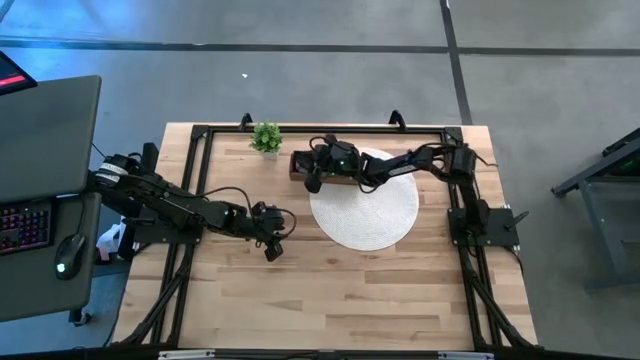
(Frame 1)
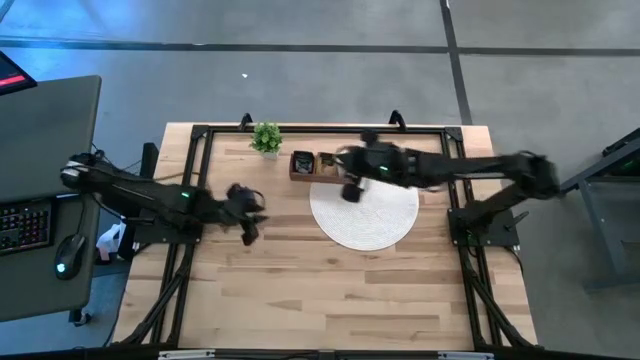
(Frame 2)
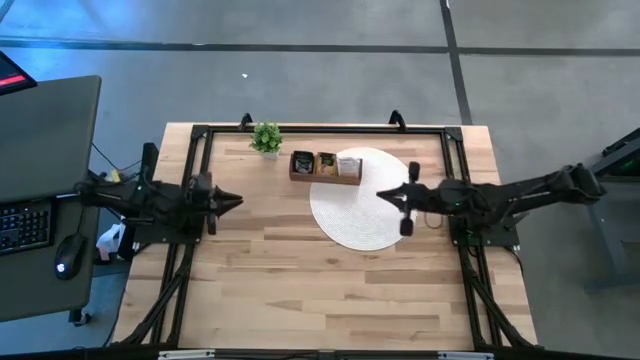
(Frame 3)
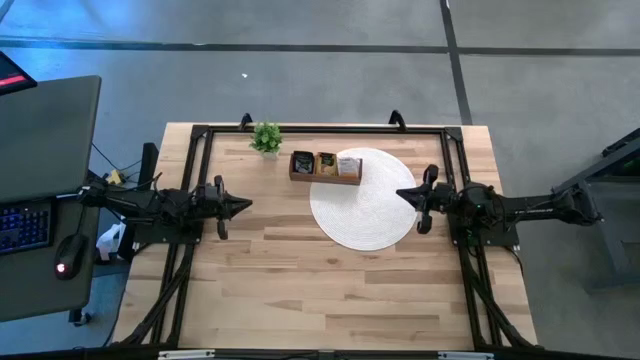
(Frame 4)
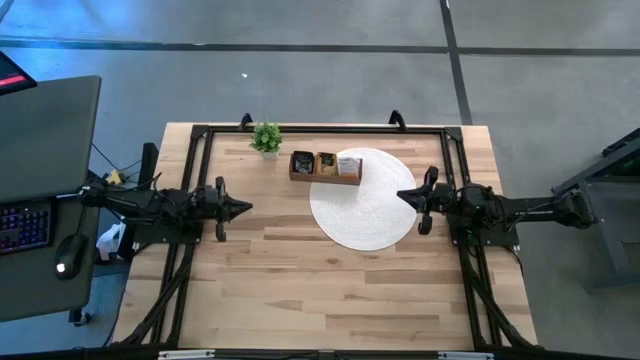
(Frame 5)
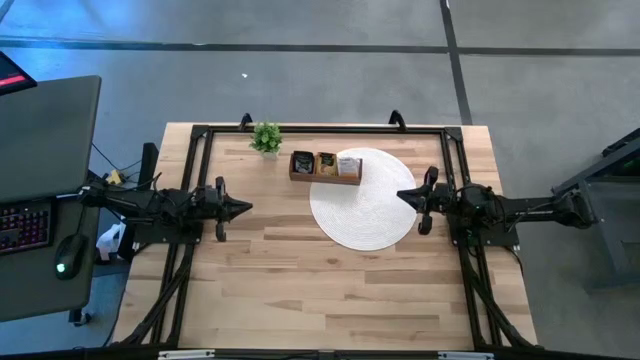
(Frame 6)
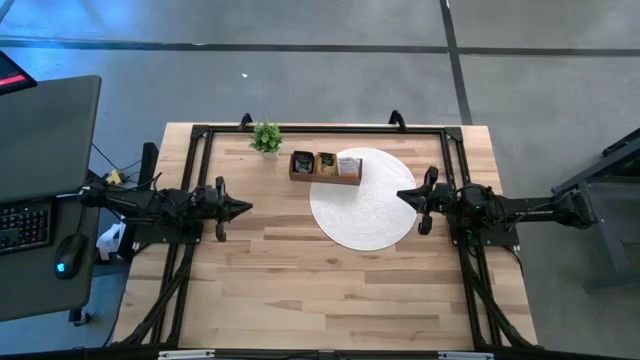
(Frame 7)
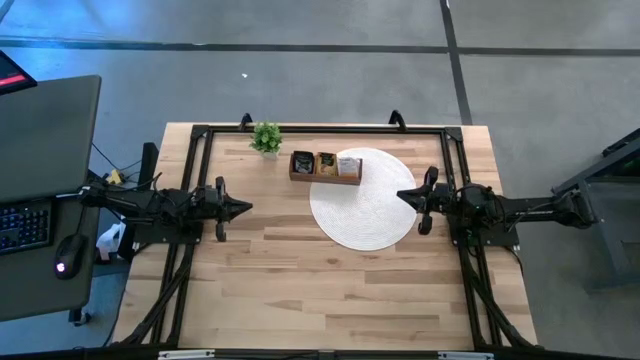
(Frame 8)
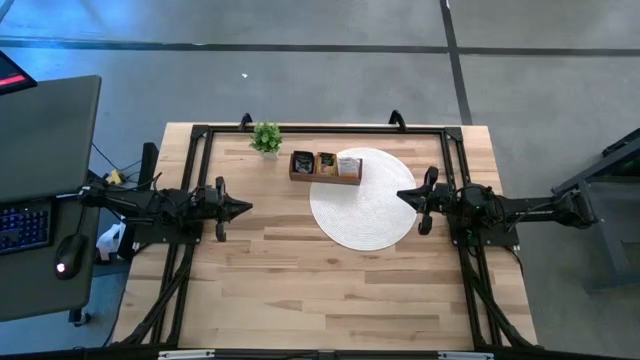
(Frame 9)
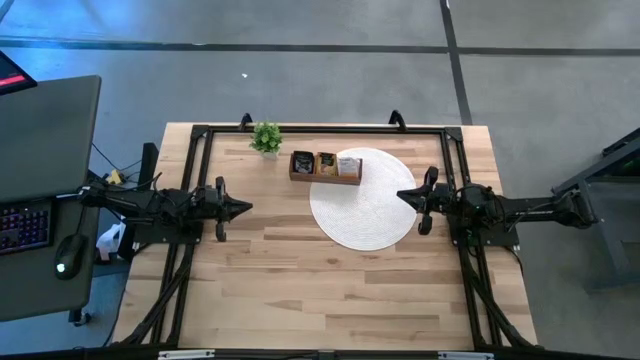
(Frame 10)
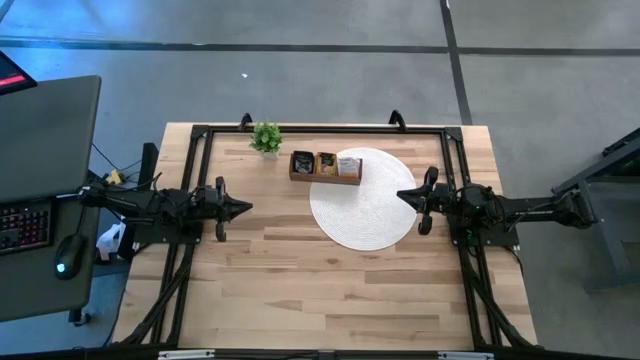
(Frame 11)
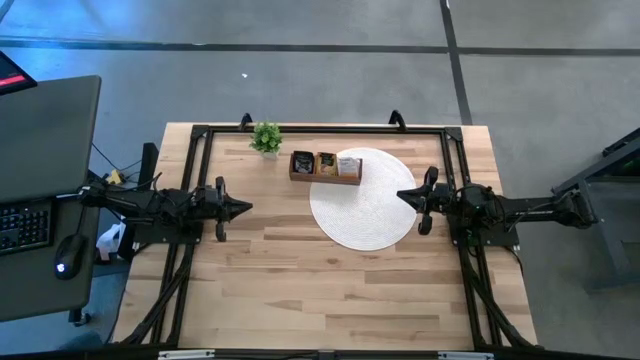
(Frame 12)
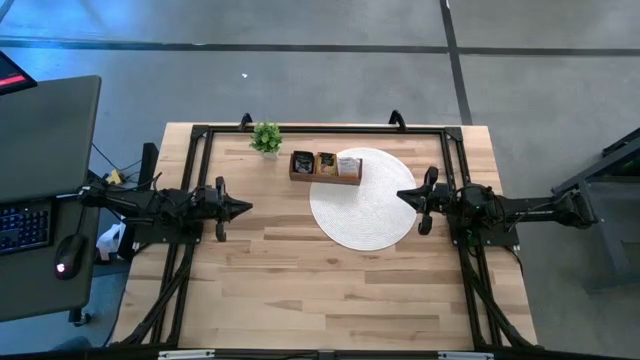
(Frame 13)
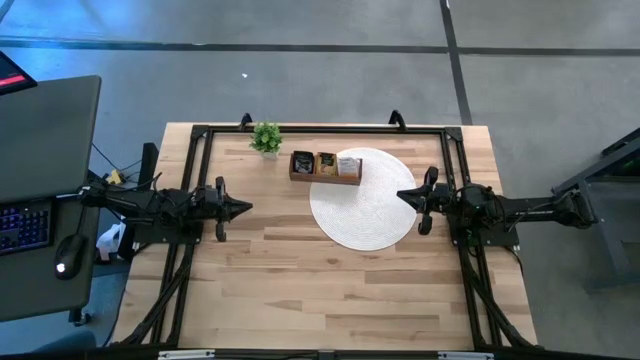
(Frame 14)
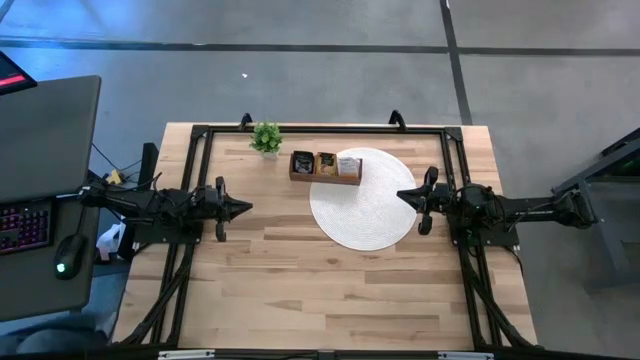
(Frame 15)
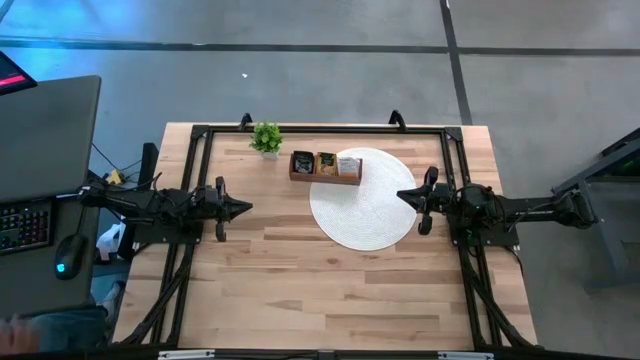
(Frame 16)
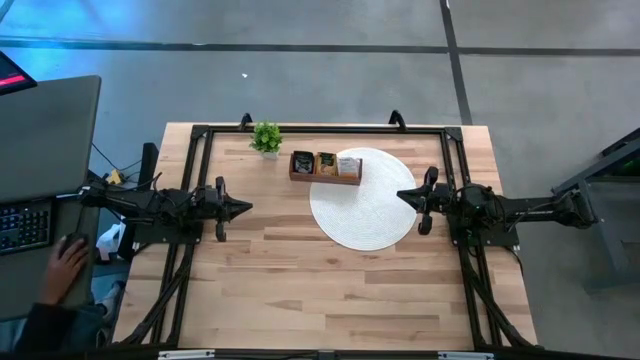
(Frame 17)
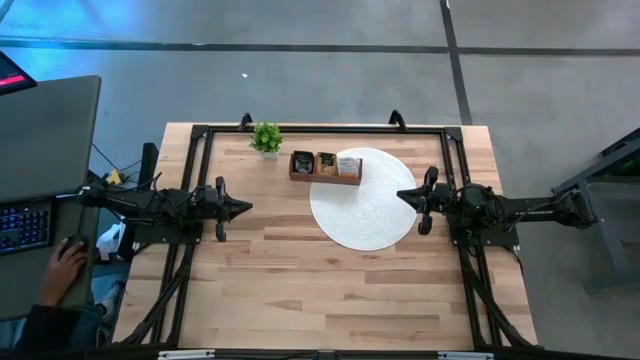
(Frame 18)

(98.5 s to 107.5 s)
Task: Pick & Place Tea
Return to Home Position

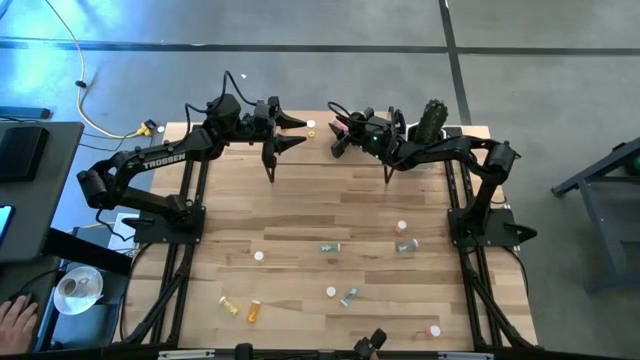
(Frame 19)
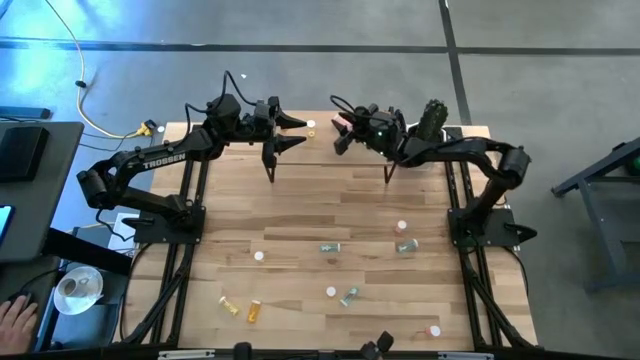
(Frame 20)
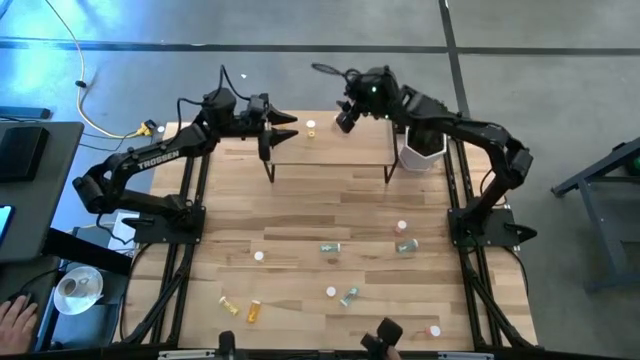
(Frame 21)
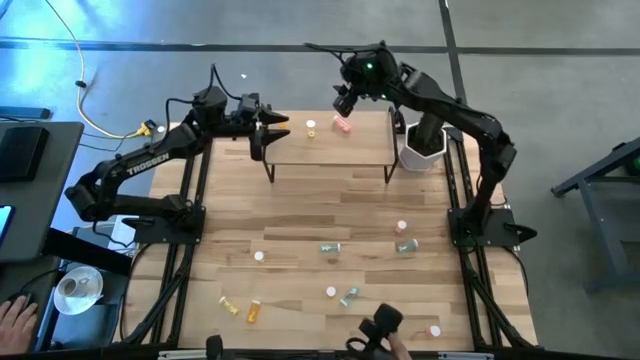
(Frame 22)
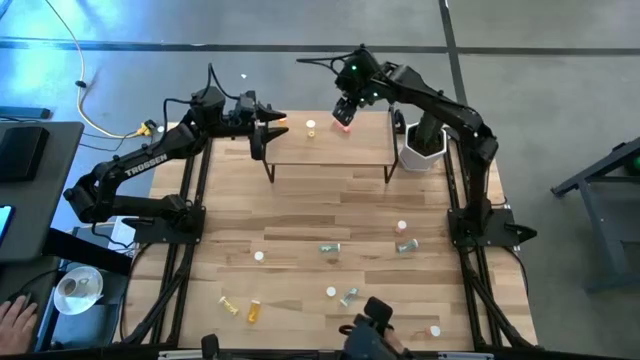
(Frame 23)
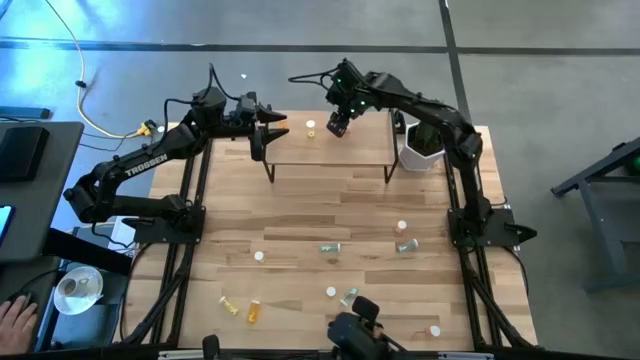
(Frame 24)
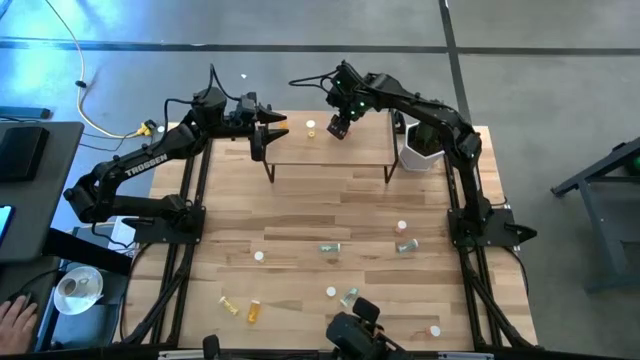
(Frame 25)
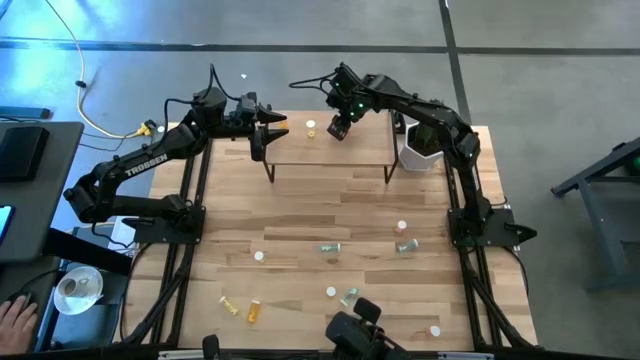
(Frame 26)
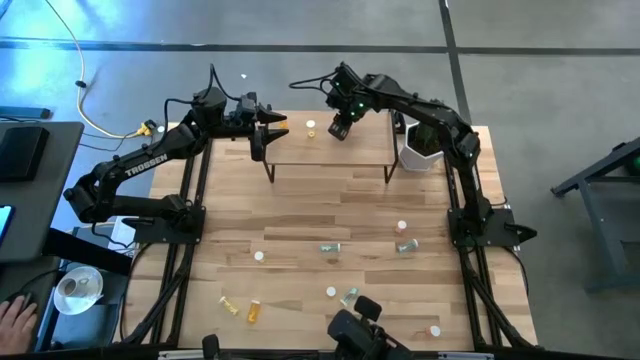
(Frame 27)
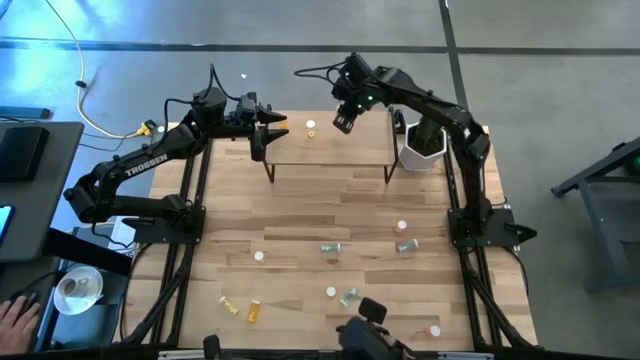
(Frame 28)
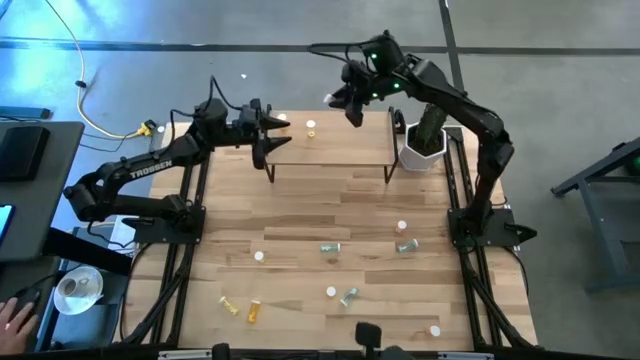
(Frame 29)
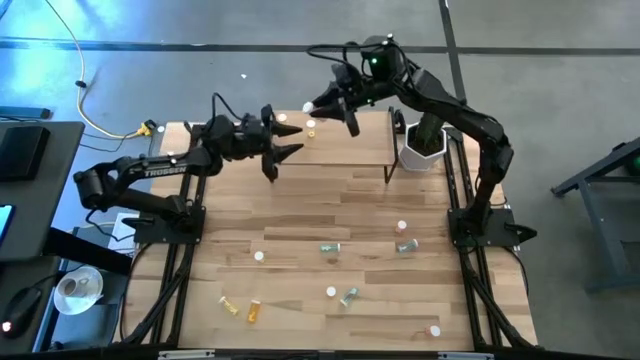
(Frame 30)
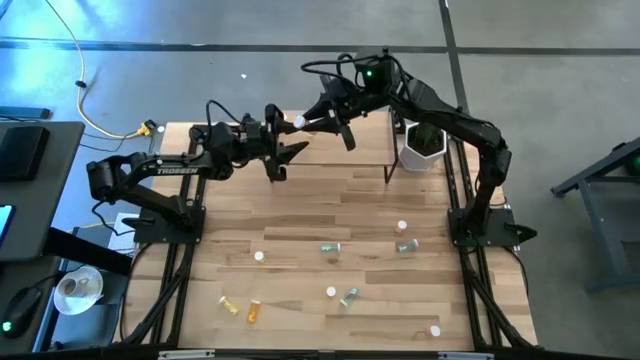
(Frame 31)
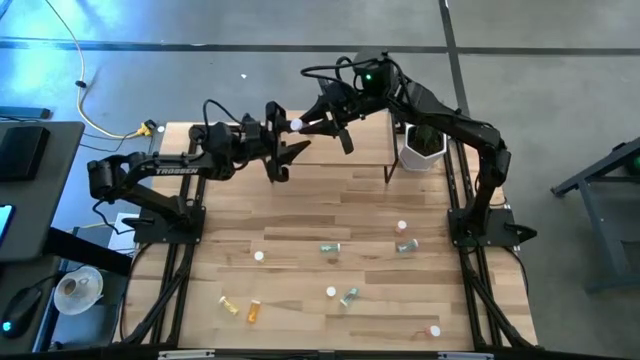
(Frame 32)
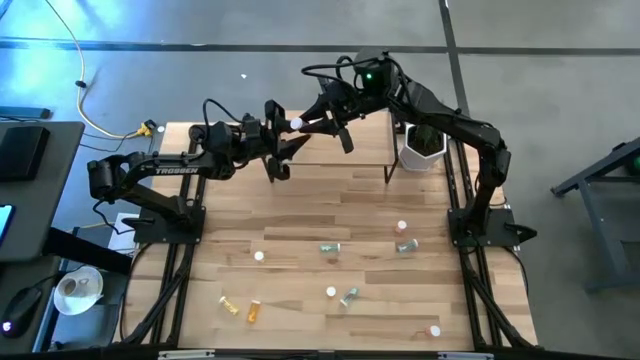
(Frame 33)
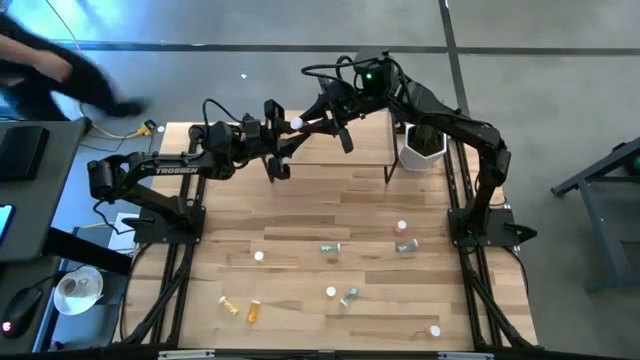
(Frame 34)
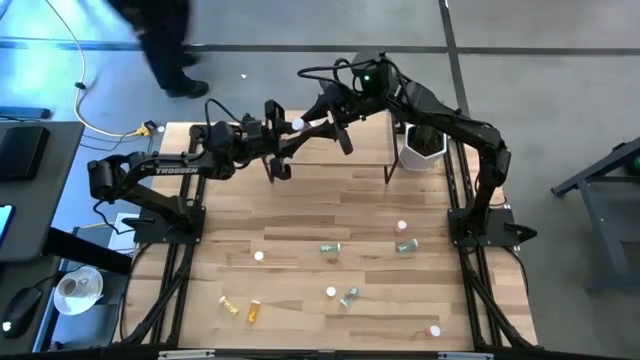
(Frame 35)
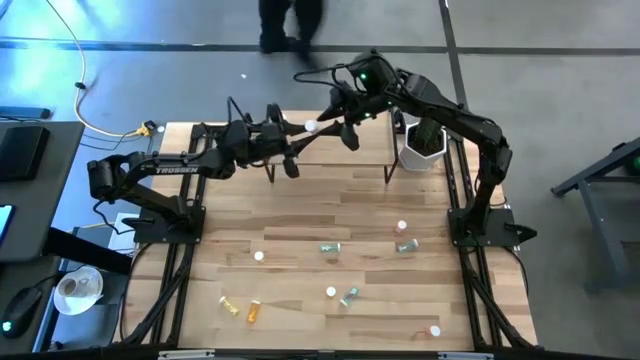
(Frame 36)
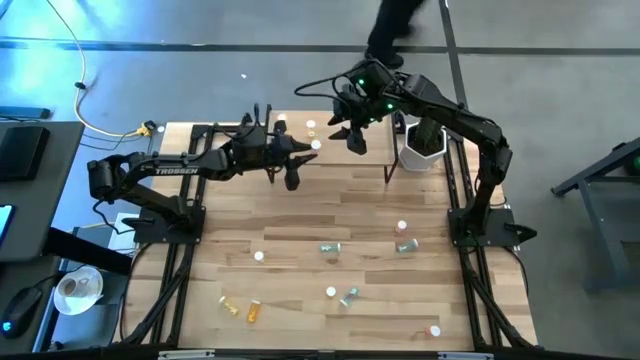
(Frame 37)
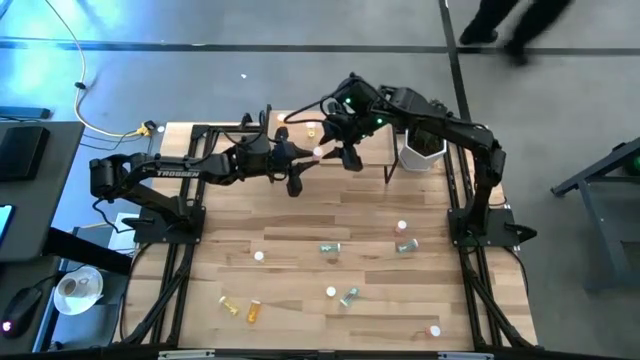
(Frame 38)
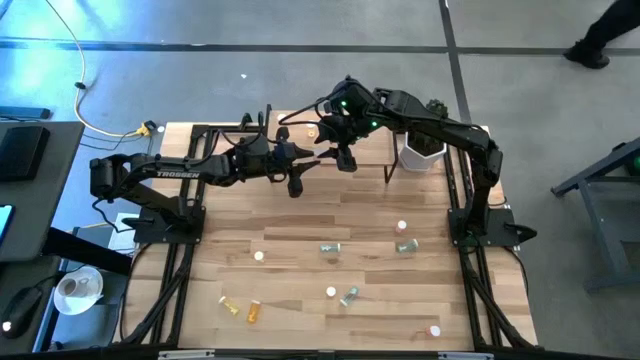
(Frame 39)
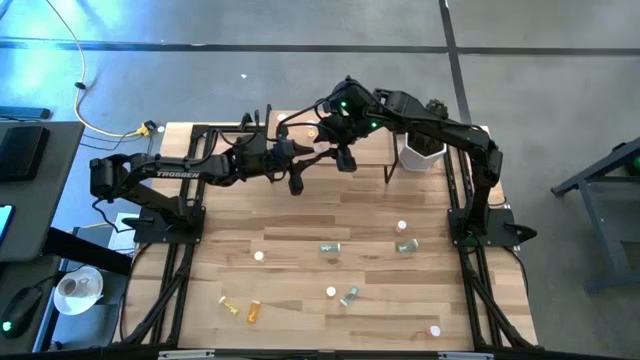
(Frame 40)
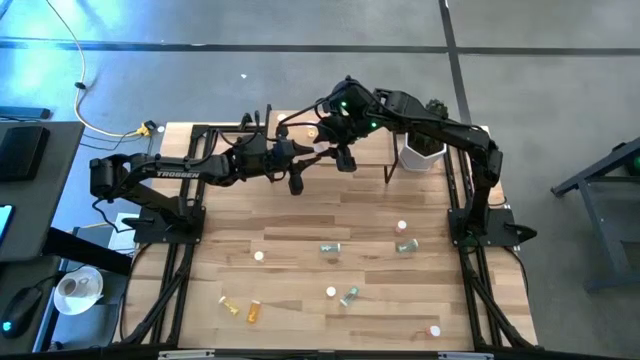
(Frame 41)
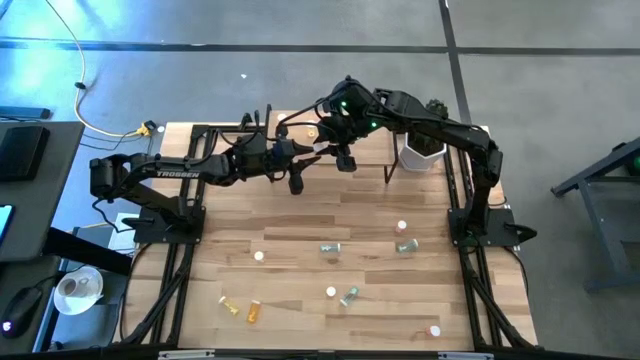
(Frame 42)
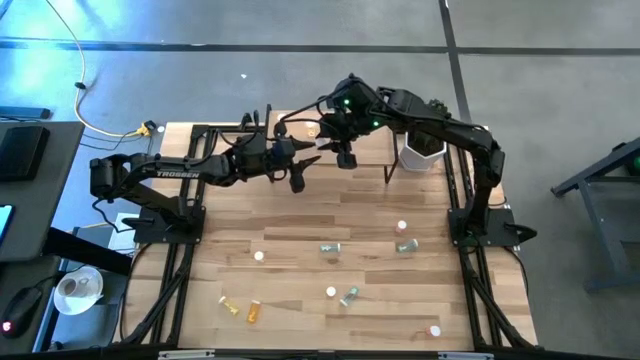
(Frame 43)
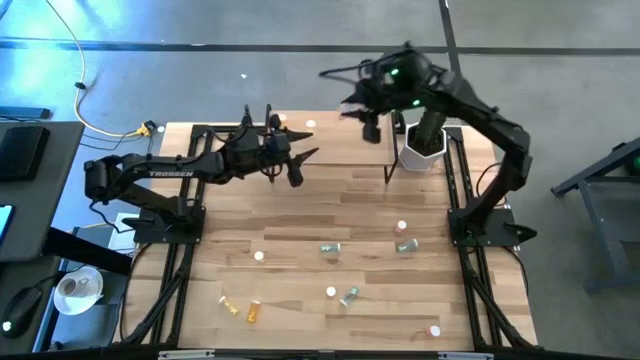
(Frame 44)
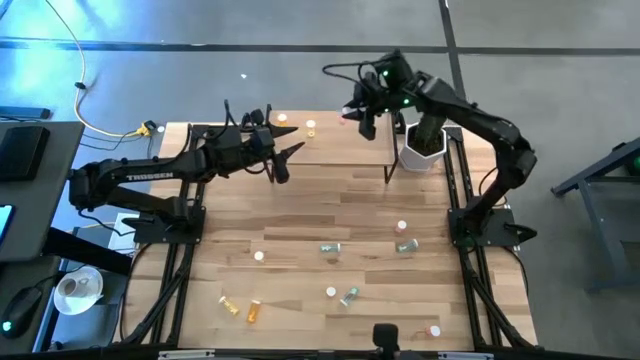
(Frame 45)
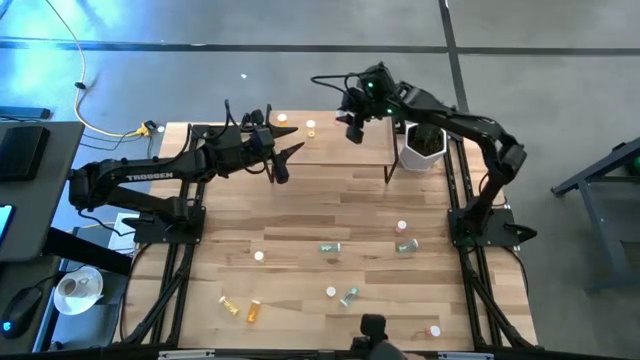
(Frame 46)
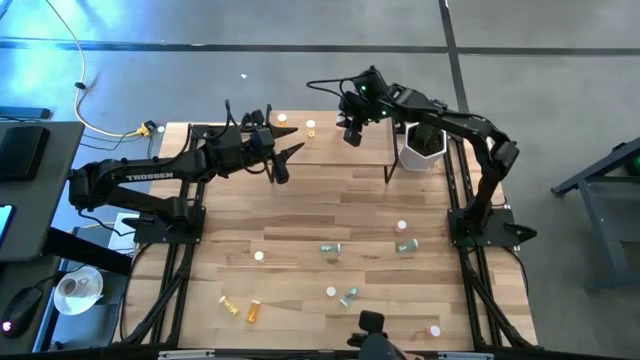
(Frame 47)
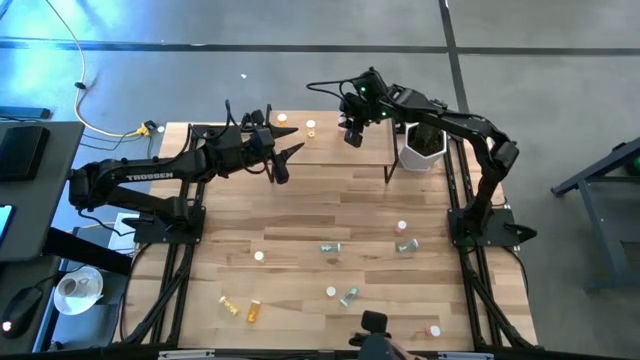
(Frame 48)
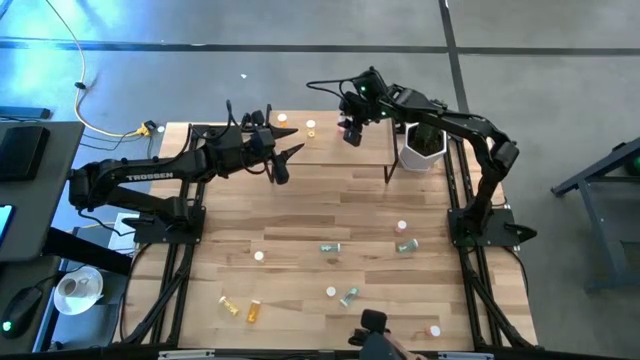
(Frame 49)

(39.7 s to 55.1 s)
Task: Pick and place medicine bottles onto shelf by color
Put the top left pink pill bottle on the shelf
